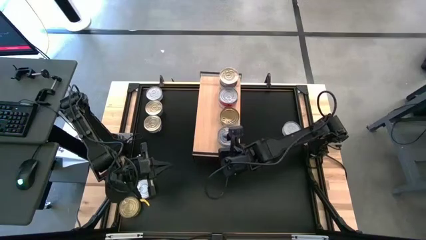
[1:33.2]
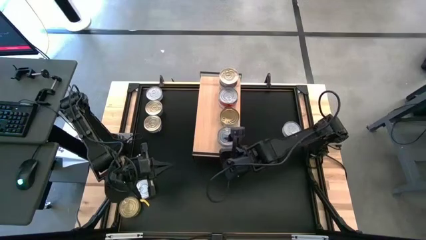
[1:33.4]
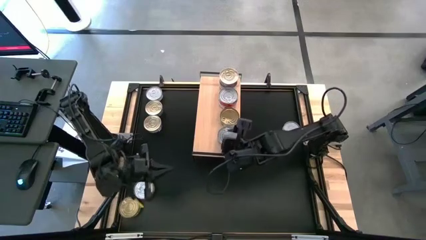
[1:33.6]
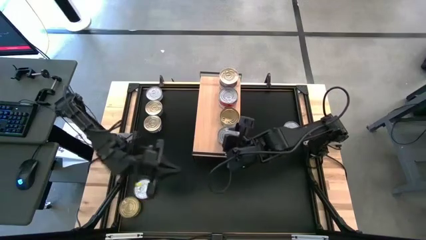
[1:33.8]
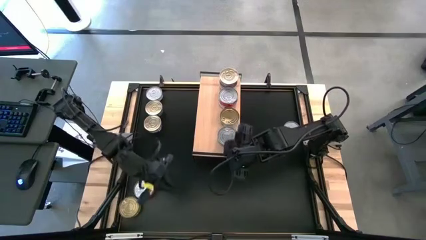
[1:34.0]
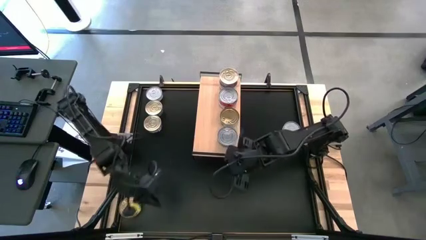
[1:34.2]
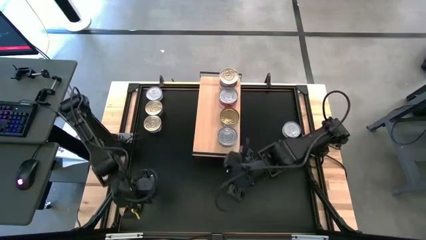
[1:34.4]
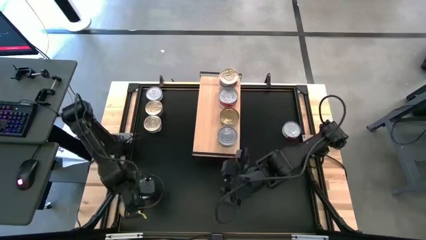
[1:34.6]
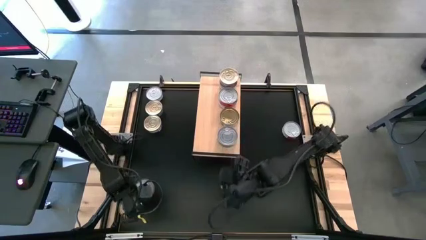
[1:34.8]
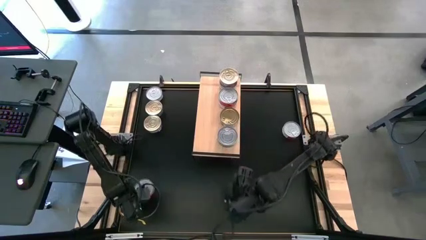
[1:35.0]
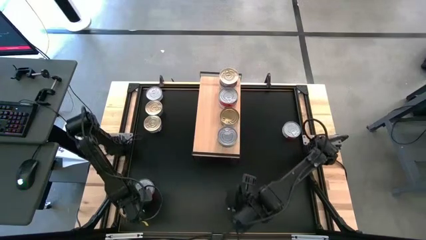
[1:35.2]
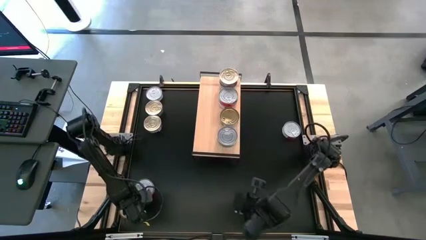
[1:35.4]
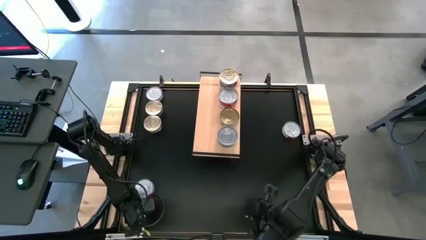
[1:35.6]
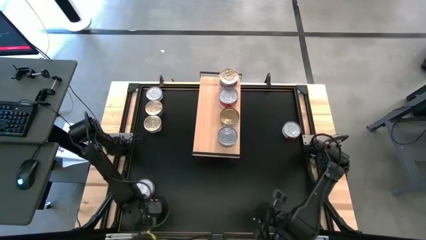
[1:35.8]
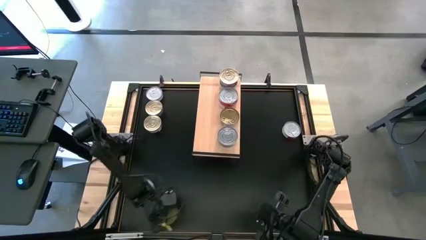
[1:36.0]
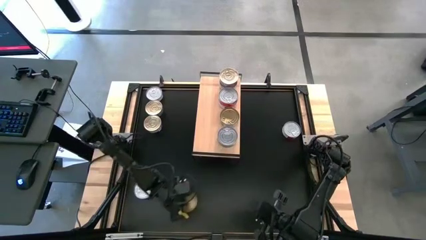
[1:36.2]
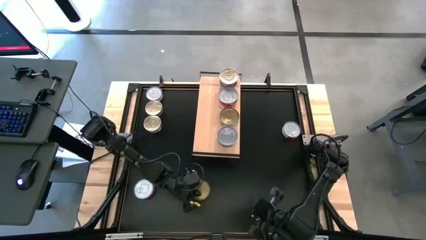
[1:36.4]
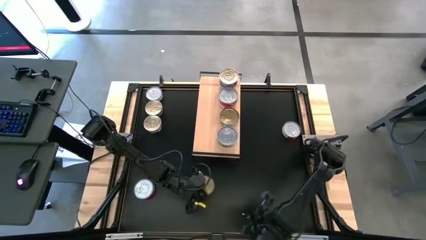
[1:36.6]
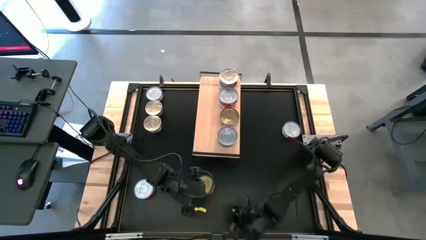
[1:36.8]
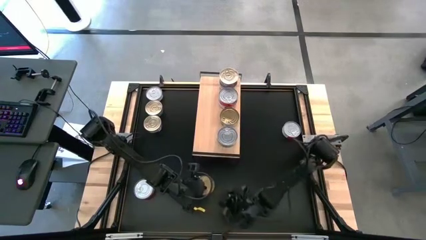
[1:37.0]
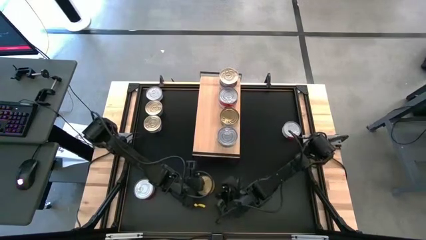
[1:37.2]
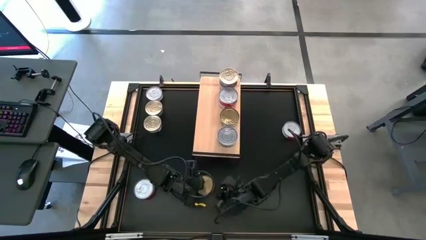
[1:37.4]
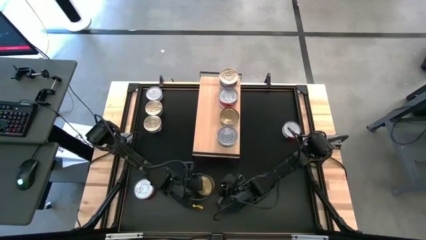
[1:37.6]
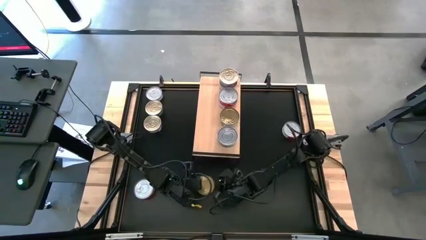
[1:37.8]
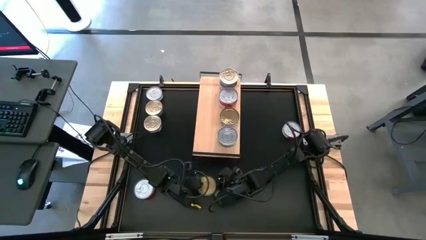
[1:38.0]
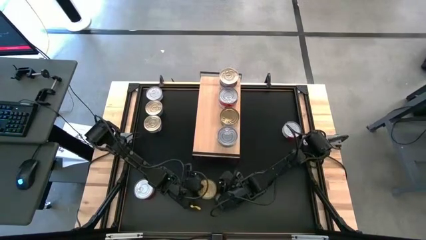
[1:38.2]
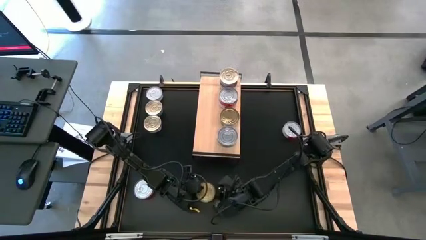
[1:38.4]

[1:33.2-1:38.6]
Task: Stack canned seafood by type on shelf
Stack the green tuna can on top of the green tuna can on the shelf

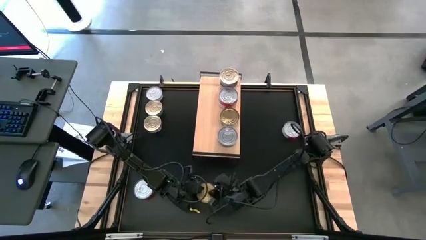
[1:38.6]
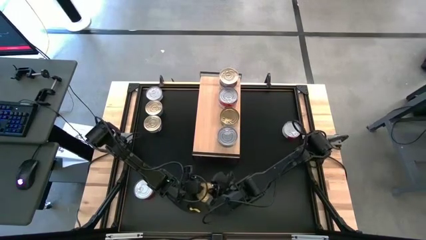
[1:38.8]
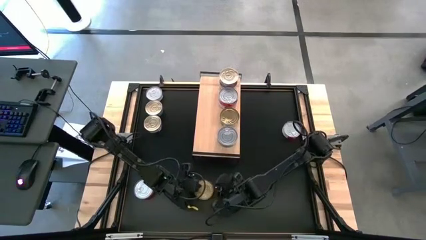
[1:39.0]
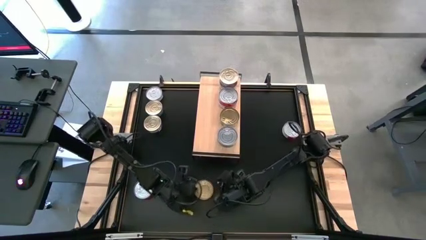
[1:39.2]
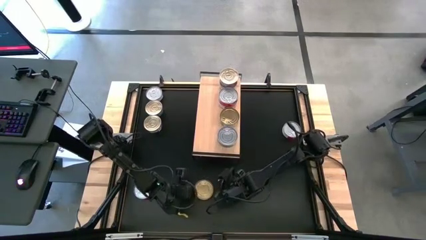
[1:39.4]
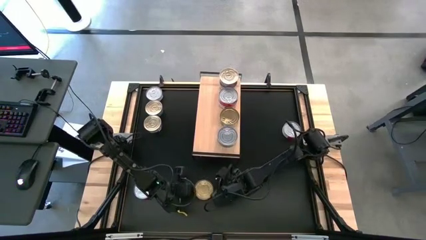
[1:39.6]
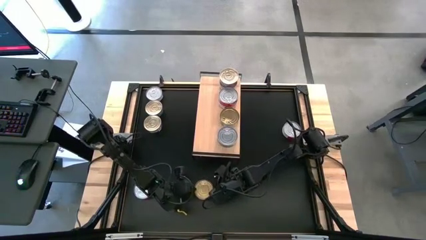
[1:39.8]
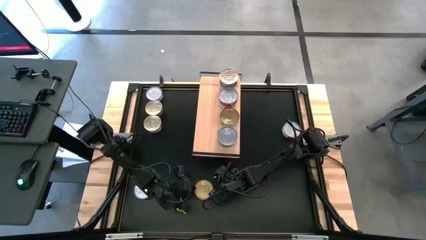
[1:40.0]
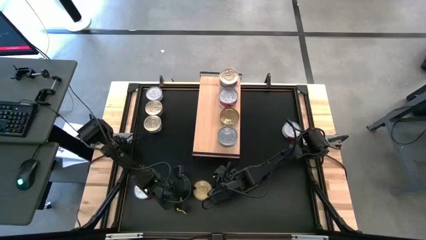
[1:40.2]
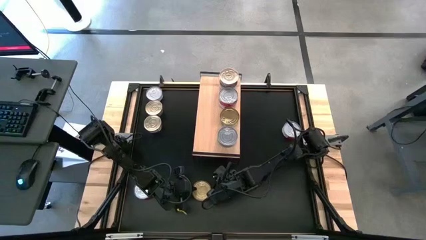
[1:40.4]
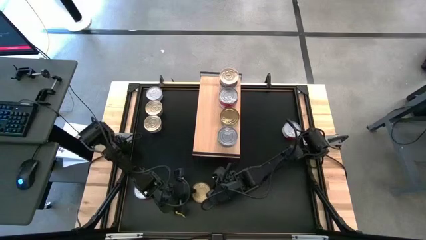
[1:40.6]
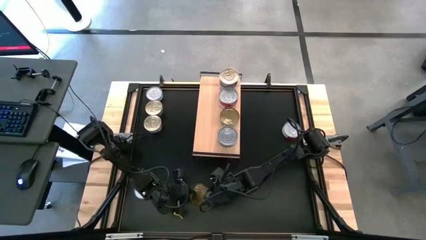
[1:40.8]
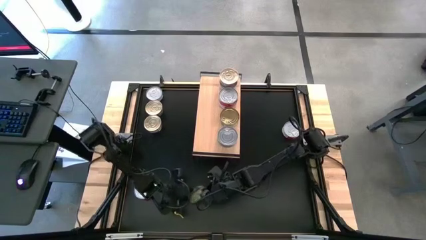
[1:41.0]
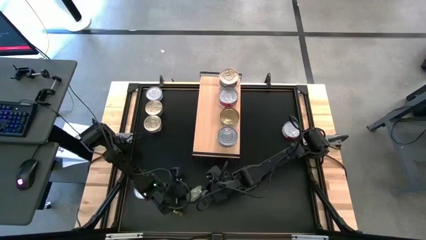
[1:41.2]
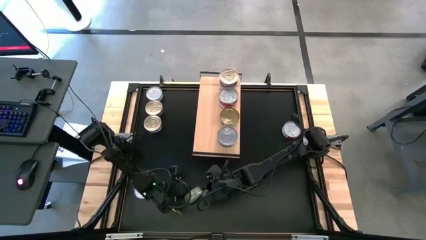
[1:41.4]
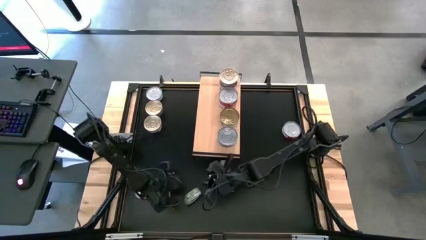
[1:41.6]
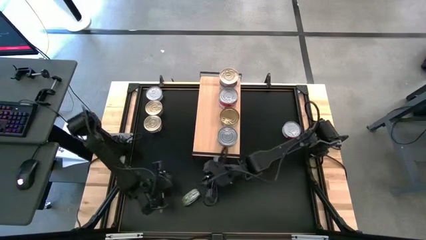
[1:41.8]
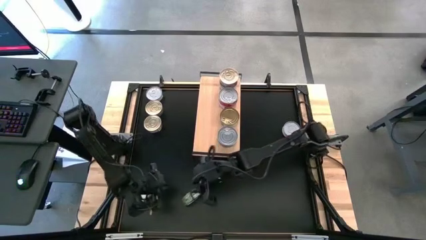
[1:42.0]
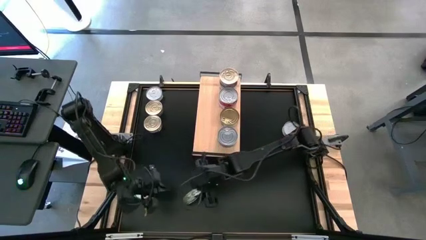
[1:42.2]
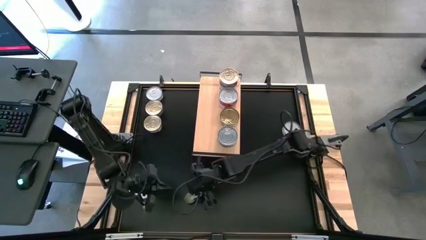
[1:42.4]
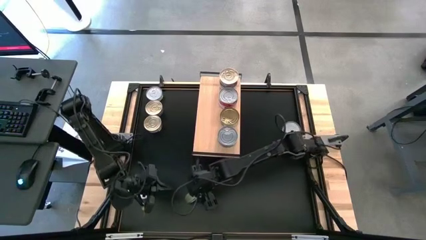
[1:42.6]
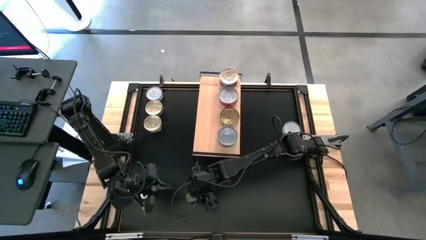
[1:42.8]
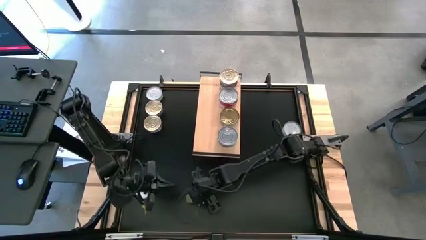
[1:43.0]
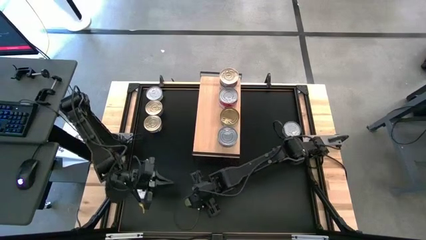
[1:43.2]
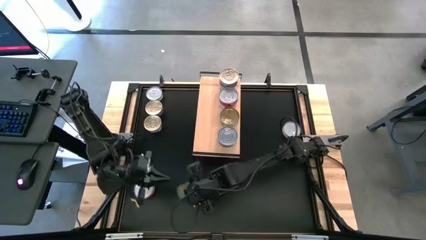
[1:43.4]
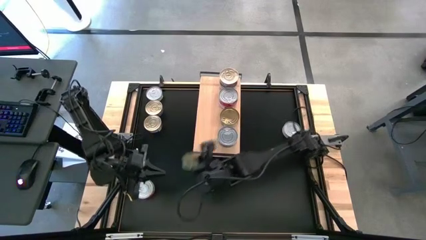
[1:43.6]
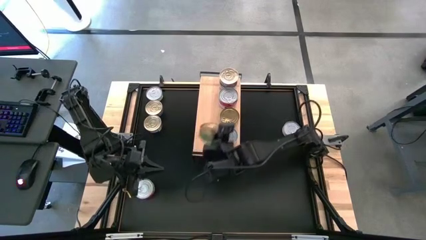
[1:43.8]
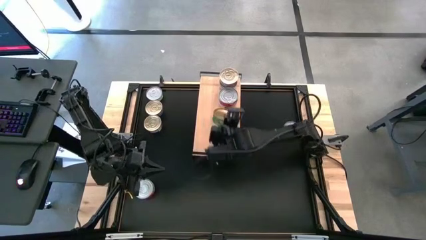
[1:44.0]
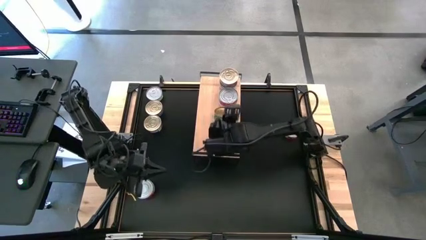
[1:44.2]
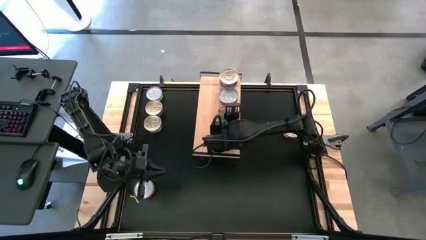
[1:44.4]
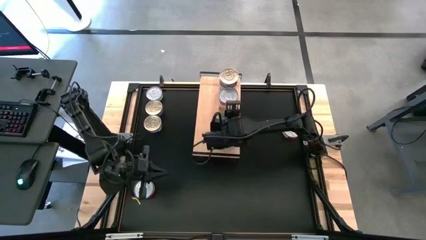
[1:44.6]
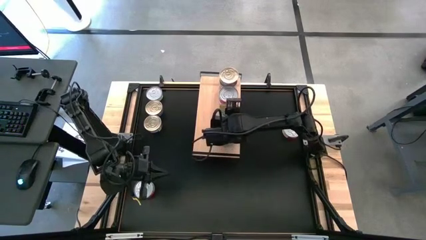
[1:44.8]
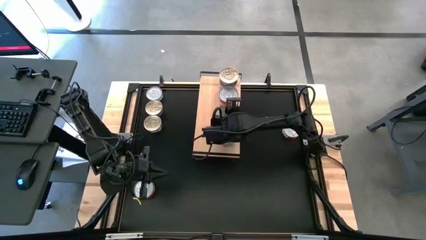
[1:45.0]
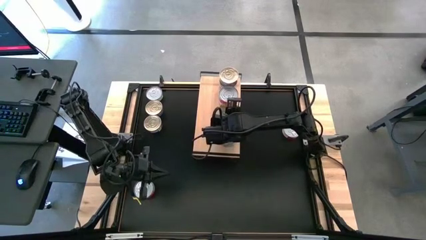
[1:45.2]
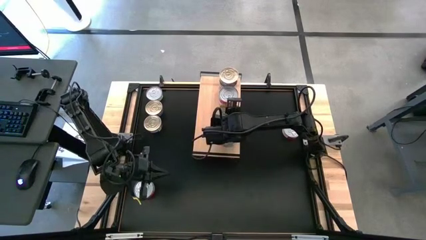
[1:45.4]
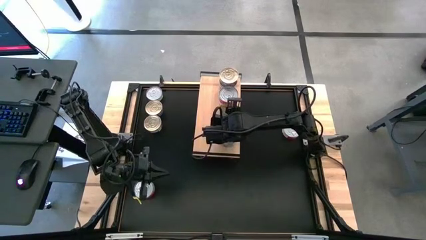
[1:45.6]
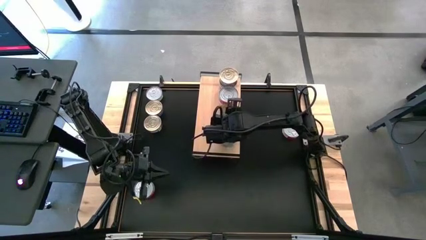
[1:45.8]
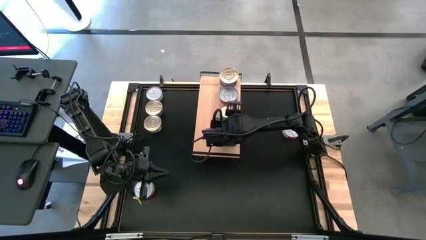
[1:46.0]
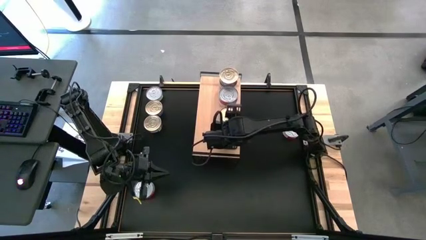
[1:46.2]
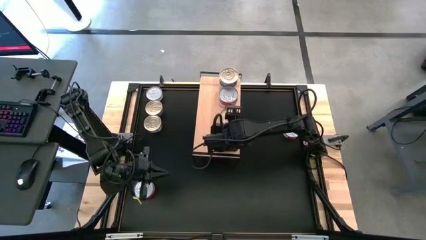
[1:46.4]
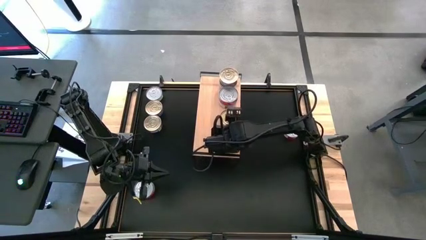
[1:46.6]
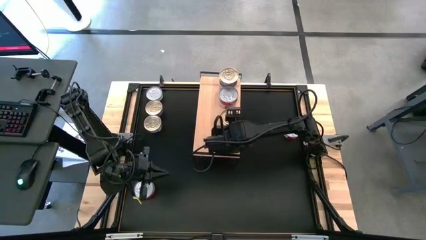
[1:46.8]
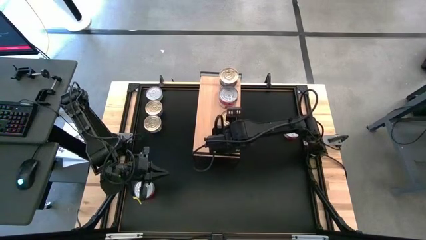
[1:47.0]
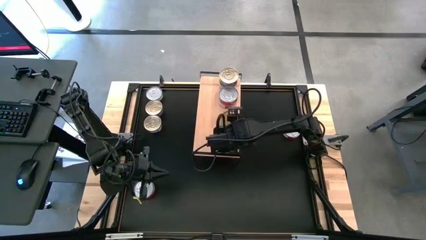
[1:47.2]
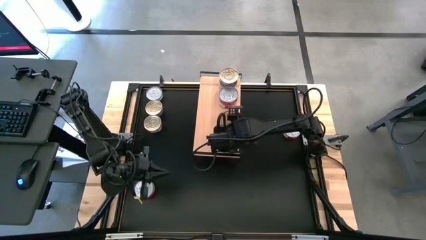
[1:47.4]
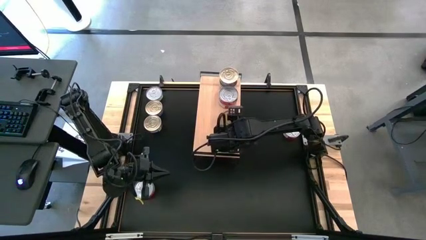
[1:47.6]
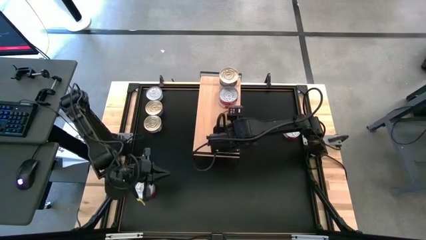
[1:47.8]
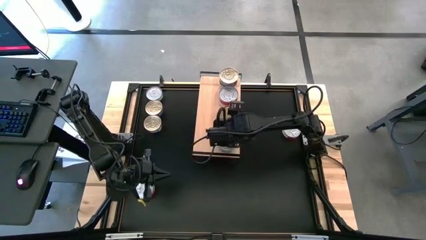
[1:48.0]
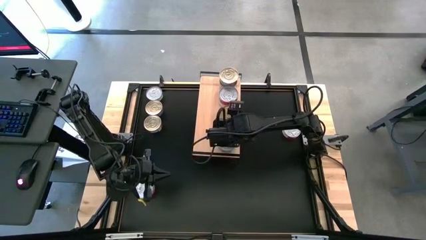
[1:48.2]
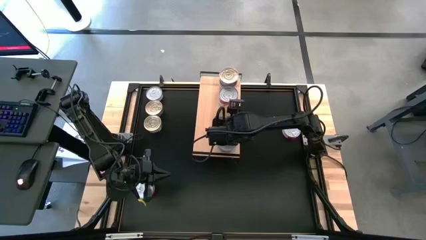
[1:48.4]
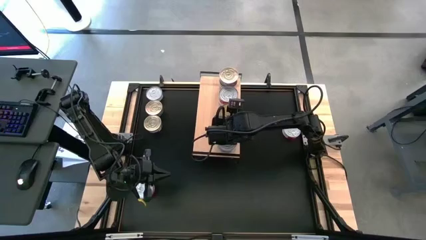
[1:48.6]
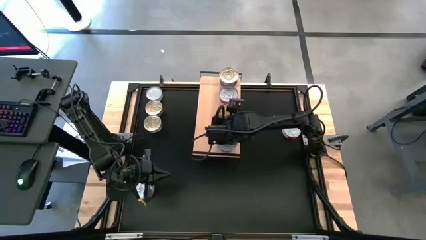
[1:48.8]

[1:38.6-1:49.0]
Stack the green tuna can on top of the green tuna can on the shelf

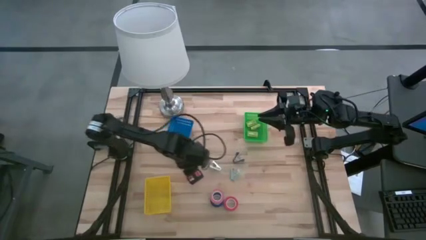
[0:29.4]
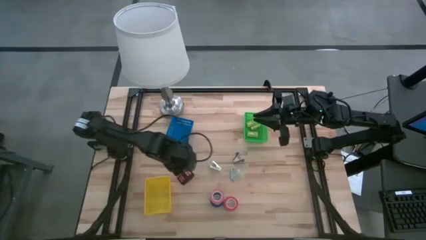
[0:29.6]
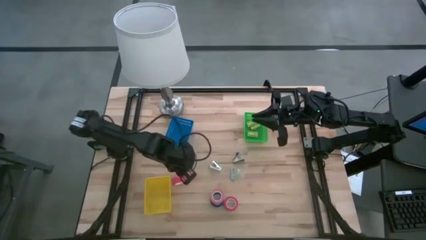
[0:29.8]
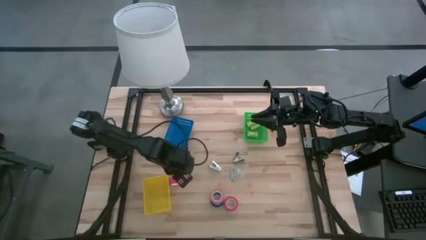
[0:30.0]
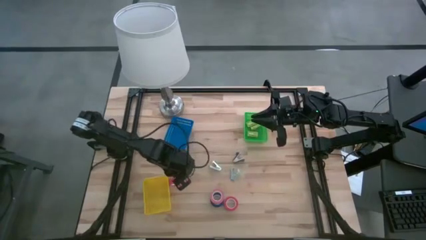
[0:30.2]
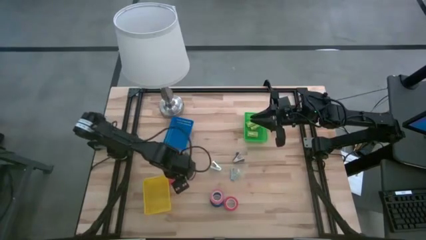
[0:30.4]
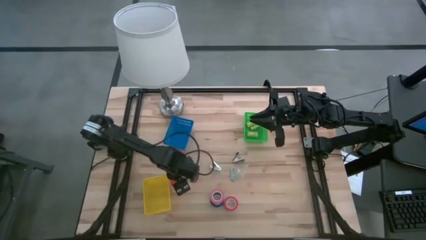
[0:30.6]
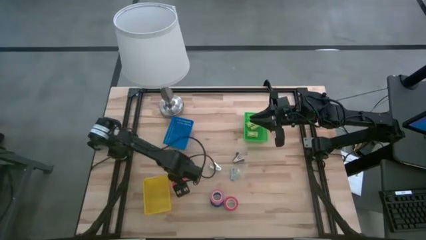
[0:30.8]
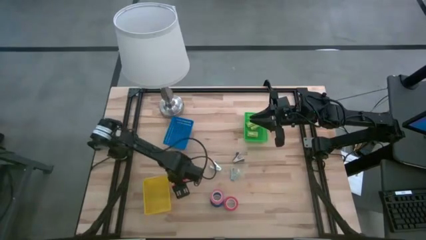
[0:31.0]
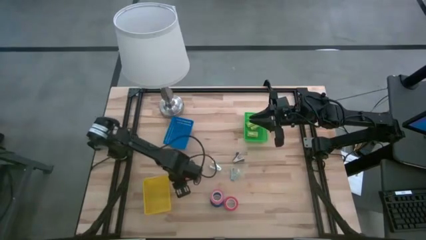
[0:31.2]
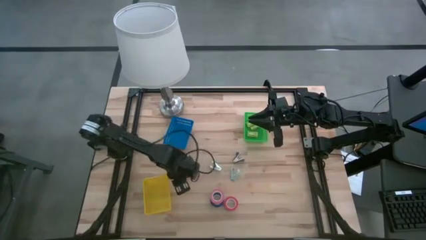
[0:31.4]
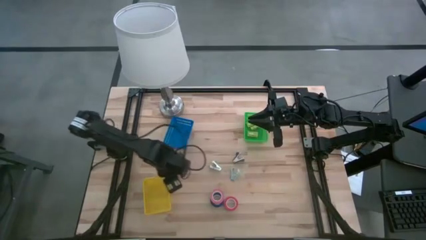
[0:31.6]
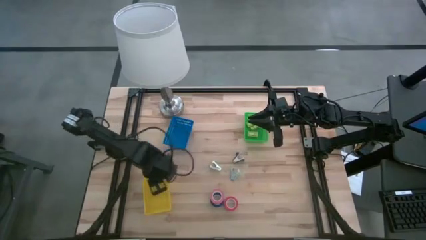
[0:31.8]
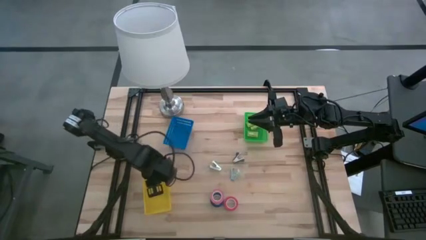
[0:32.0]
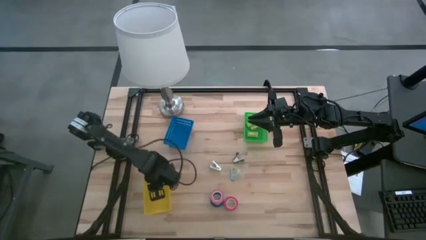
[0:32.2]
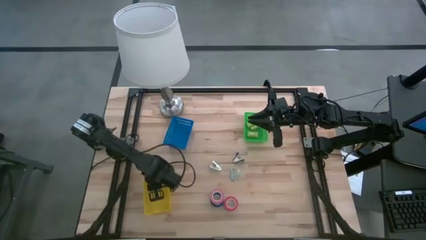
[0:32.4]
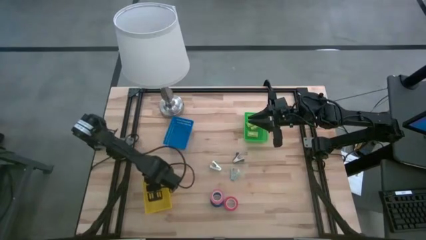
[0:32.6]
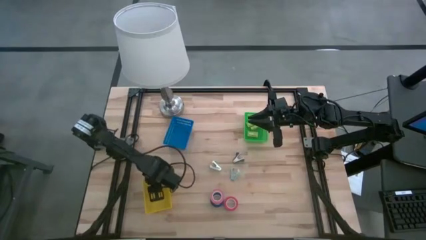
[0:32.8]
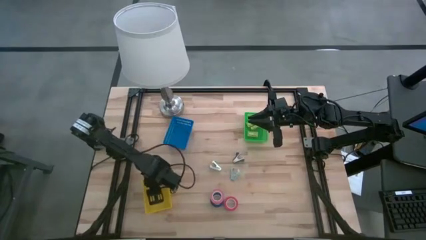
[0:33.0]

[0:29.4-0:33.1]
Task: Pick and place Stapler, Stapler remover, tape
Put the top orange tape into the yellow bin
